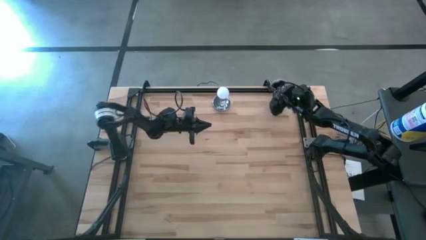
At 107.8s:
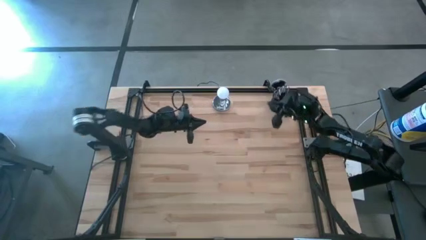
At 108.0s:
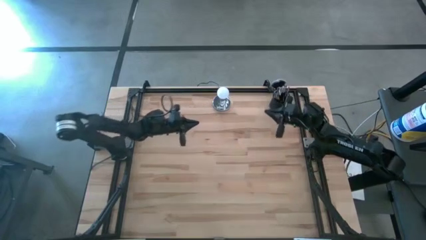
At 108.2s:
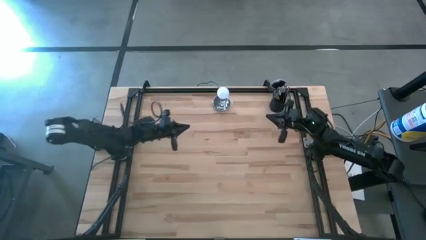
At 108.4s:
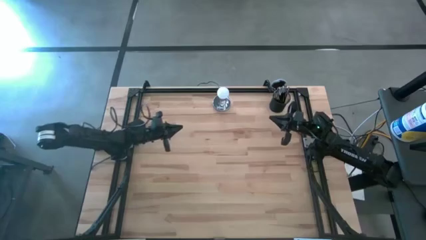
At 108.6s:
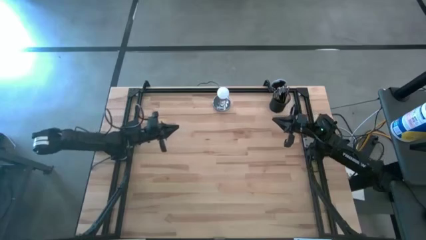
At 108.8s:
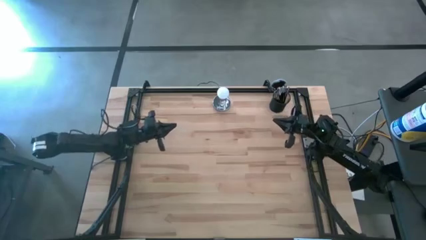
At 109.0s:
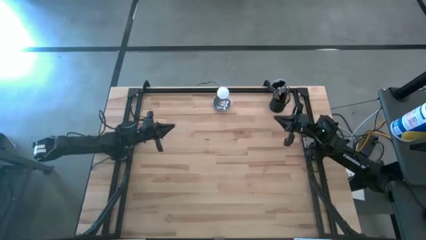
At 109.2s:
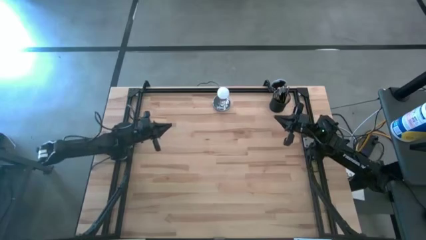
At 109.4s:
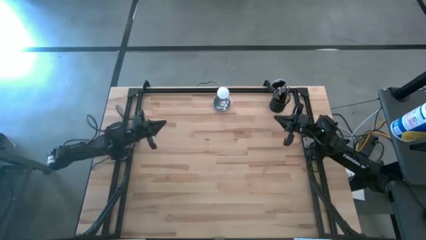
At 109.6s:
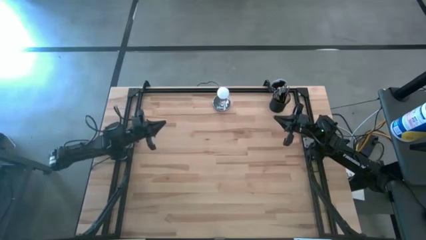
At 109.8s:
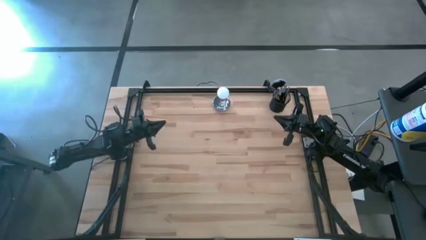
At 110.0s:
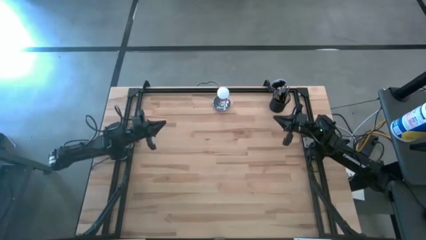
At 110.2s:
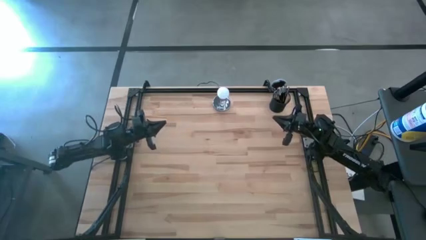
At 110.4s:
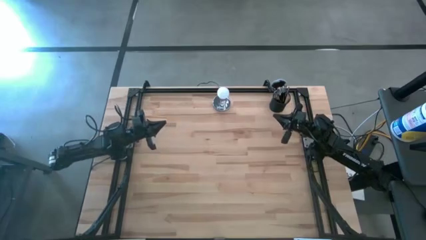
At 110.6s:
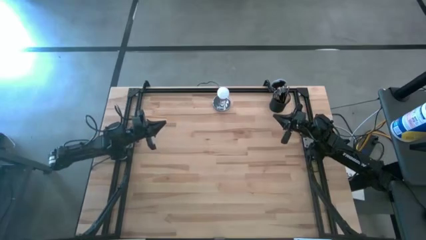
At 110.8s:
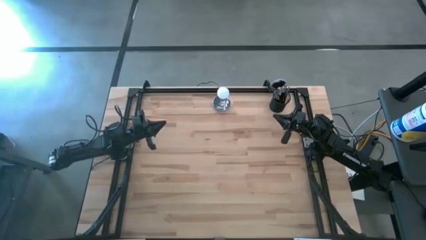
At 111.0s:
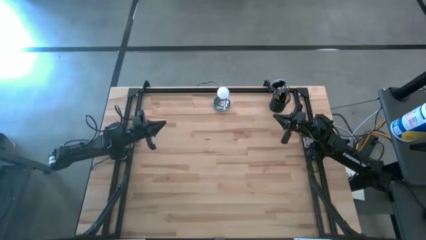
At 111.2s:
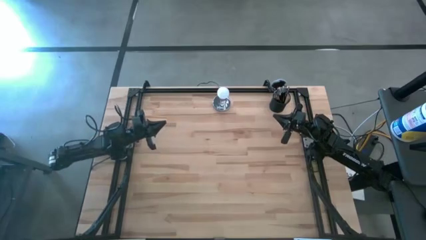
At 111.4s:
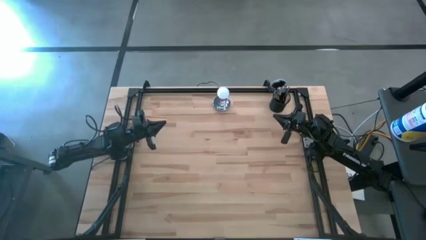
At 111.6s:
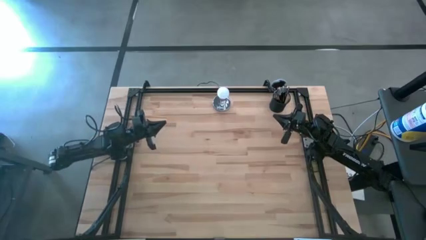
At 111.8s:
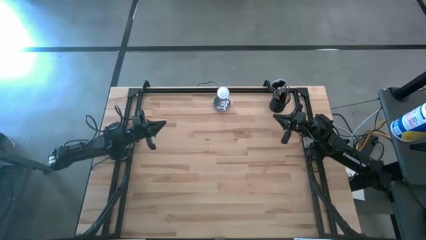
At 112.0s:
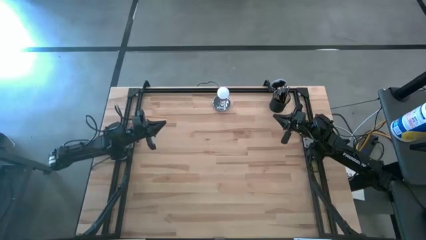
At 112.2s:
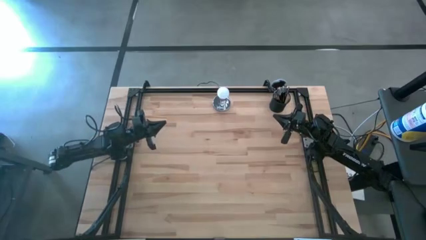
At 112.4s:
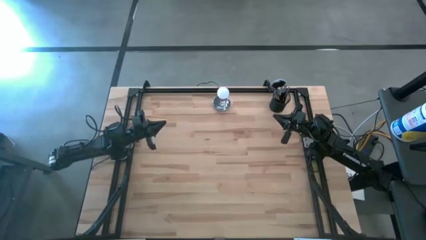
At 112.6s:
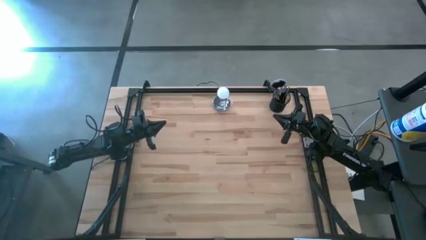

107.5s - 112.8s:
Task: Put items in baskets/containers
Return to Home Position

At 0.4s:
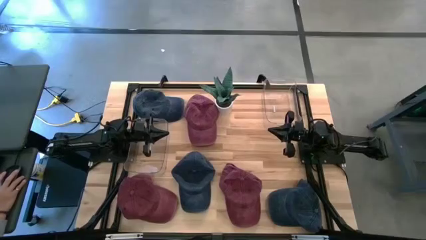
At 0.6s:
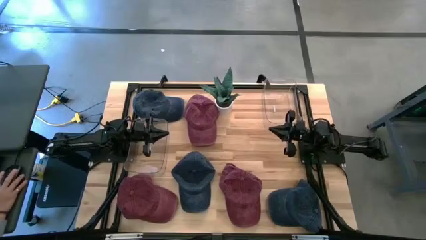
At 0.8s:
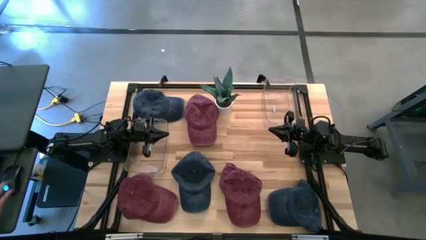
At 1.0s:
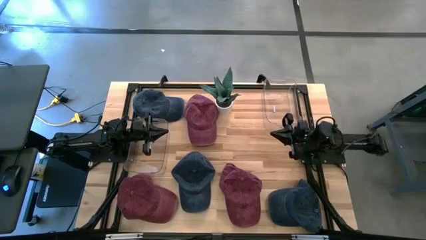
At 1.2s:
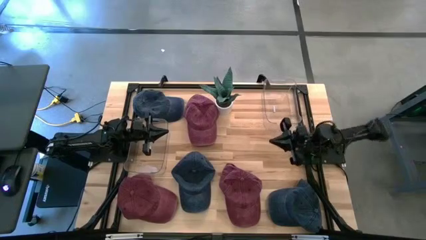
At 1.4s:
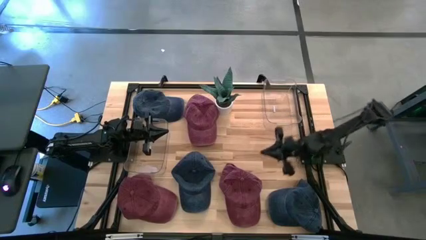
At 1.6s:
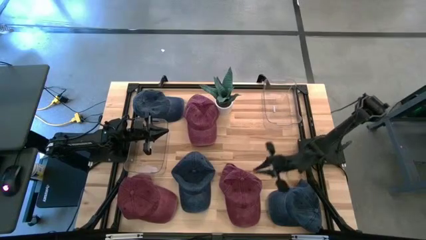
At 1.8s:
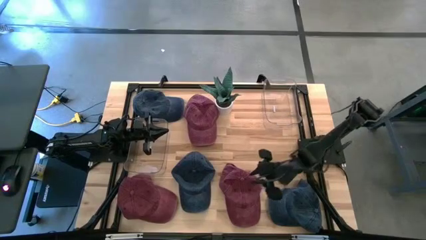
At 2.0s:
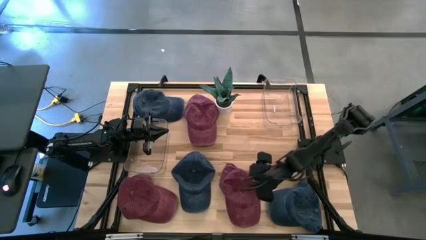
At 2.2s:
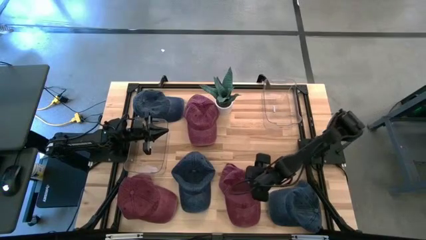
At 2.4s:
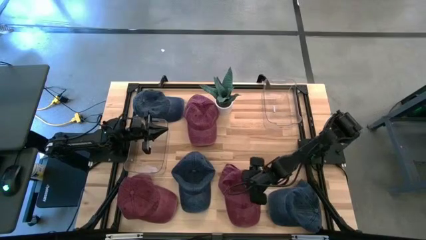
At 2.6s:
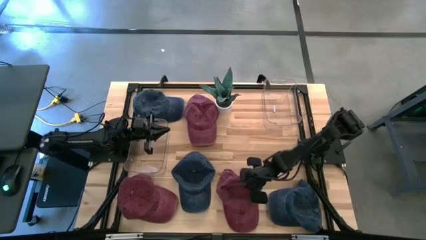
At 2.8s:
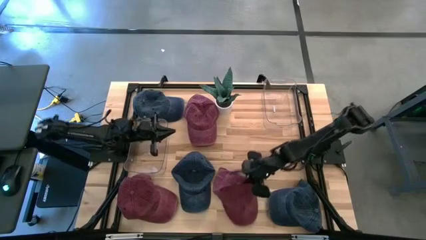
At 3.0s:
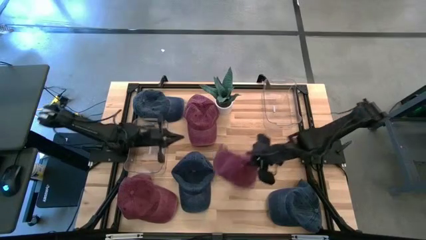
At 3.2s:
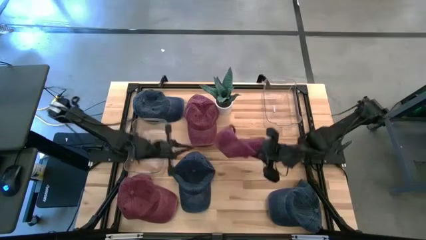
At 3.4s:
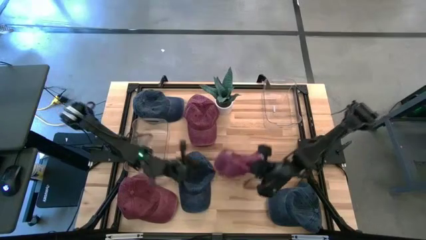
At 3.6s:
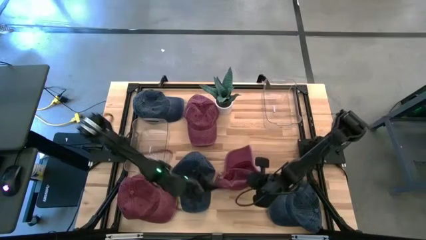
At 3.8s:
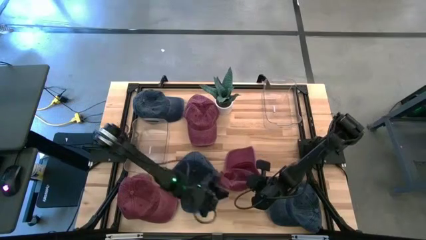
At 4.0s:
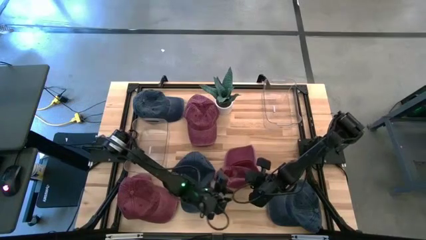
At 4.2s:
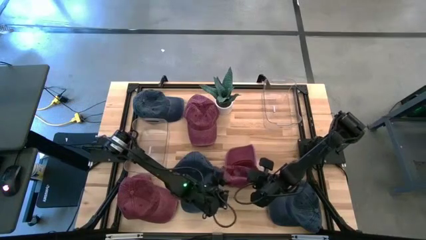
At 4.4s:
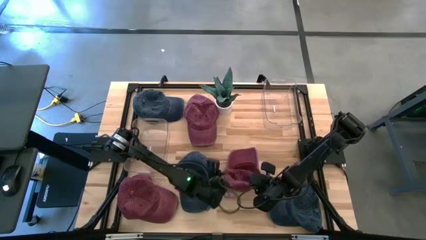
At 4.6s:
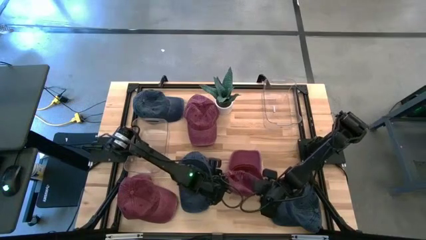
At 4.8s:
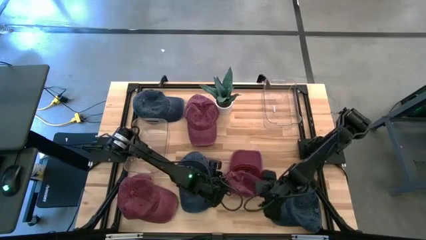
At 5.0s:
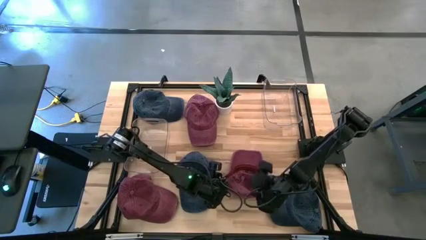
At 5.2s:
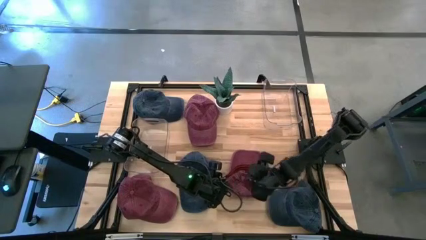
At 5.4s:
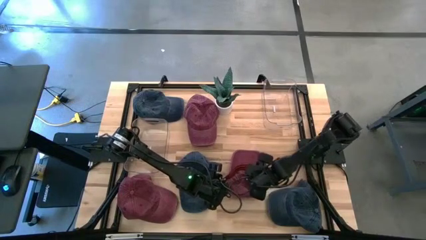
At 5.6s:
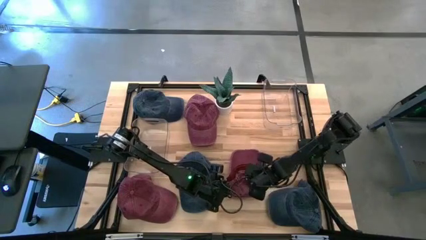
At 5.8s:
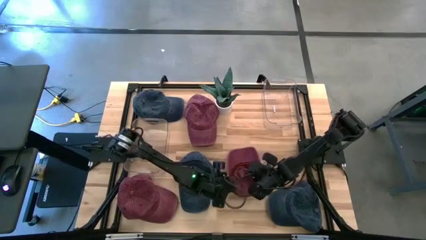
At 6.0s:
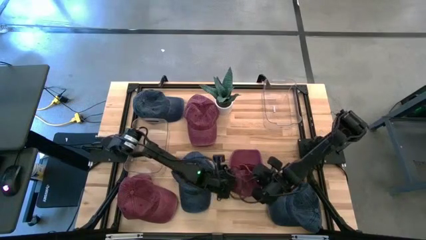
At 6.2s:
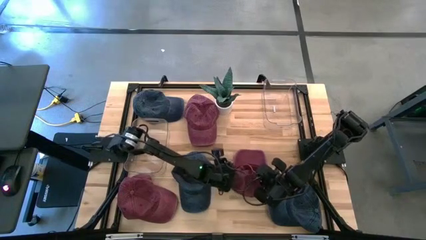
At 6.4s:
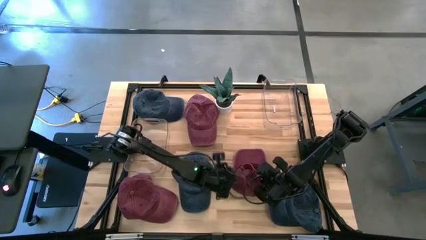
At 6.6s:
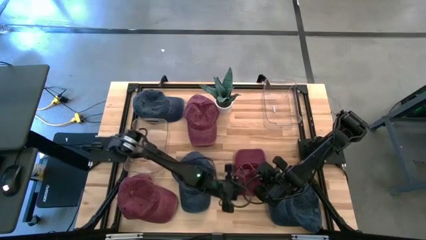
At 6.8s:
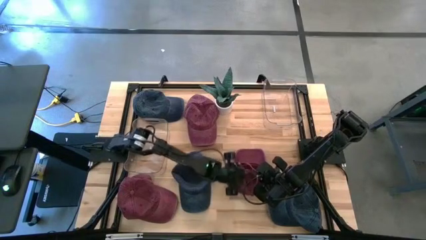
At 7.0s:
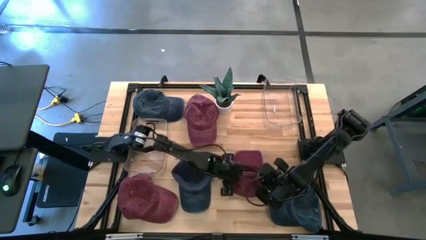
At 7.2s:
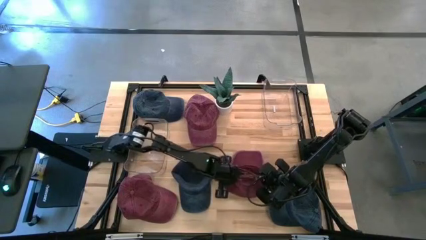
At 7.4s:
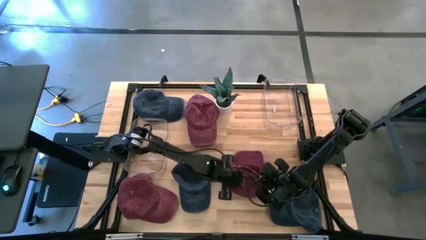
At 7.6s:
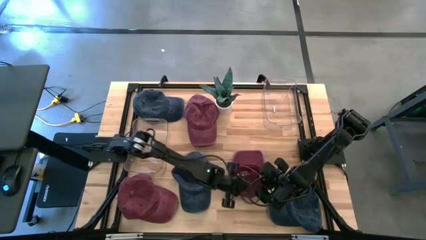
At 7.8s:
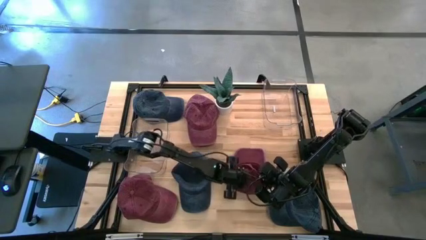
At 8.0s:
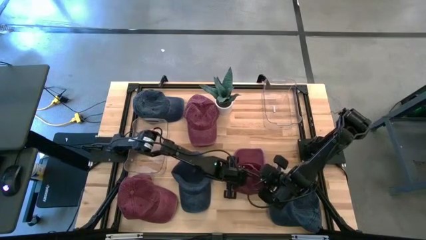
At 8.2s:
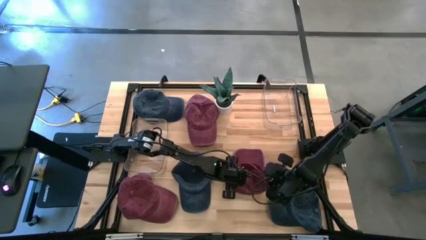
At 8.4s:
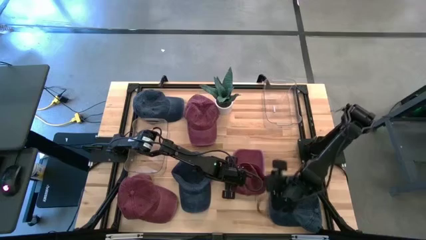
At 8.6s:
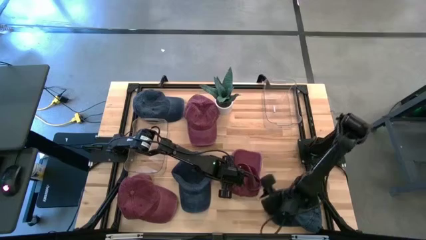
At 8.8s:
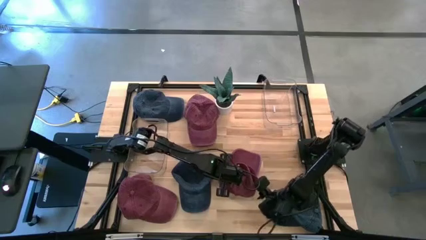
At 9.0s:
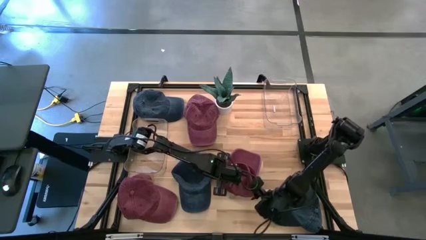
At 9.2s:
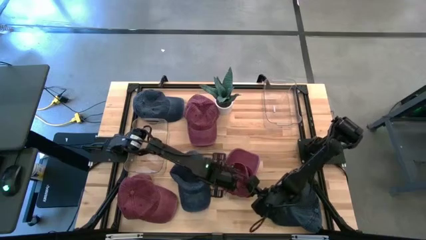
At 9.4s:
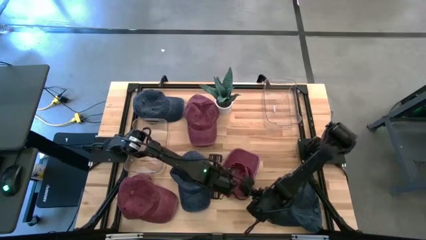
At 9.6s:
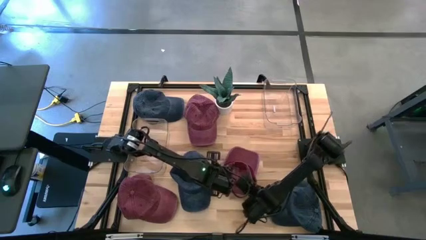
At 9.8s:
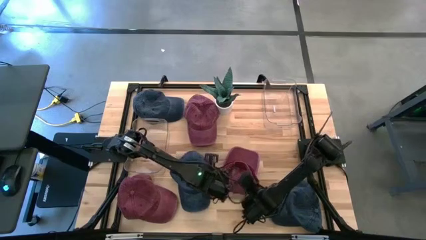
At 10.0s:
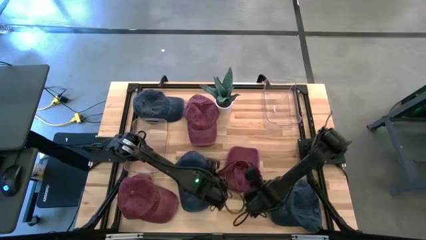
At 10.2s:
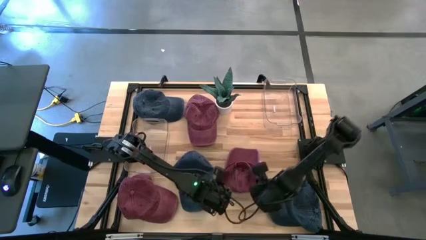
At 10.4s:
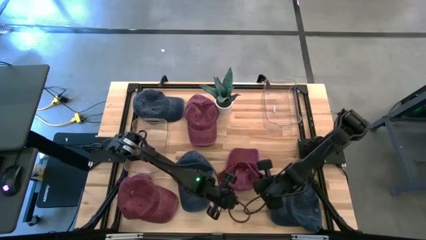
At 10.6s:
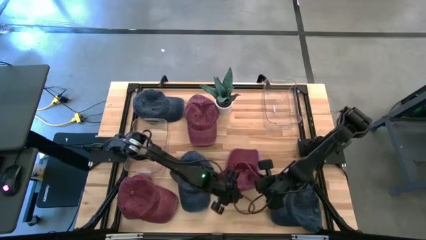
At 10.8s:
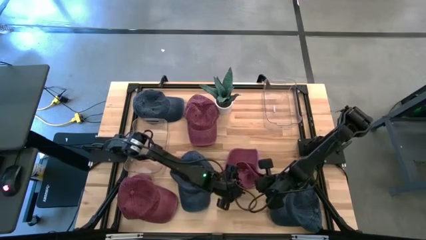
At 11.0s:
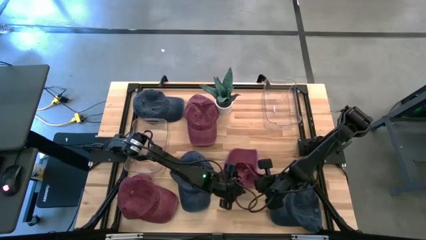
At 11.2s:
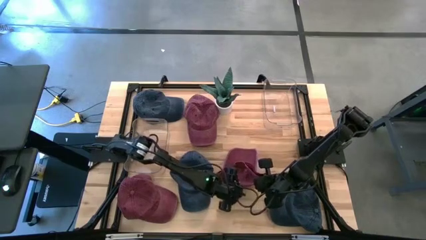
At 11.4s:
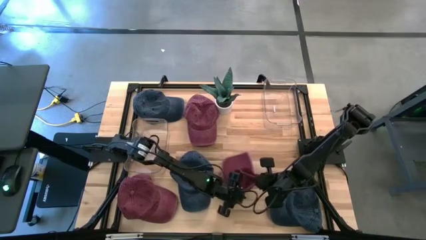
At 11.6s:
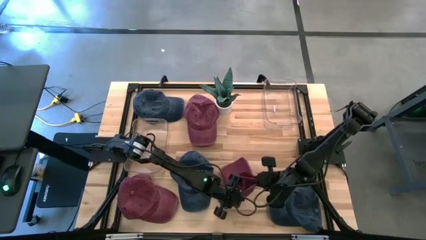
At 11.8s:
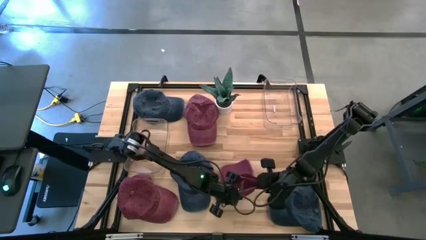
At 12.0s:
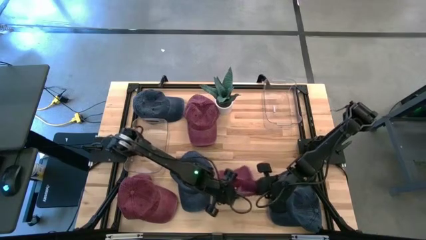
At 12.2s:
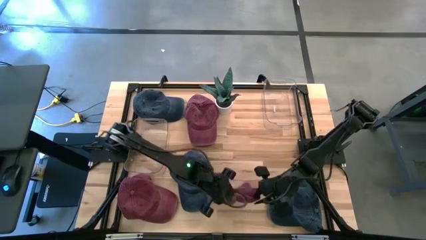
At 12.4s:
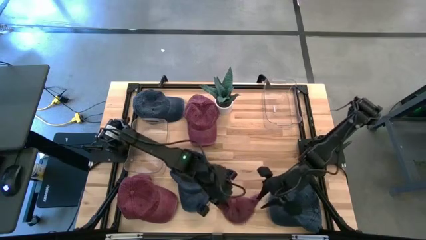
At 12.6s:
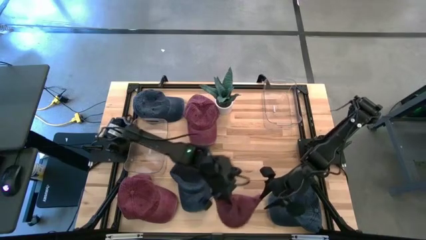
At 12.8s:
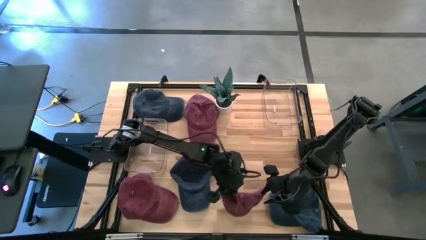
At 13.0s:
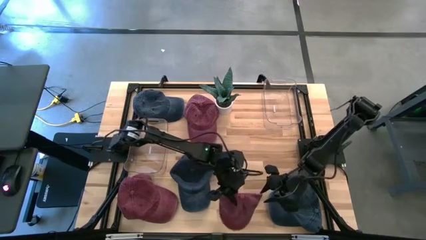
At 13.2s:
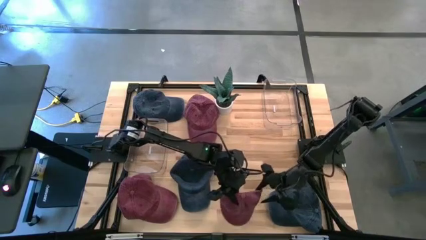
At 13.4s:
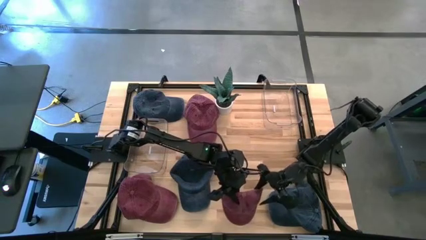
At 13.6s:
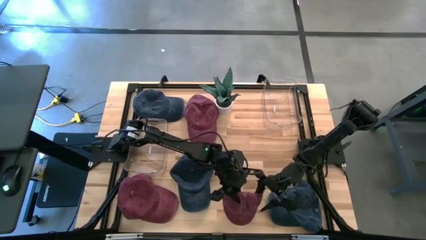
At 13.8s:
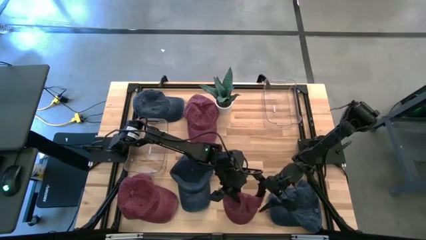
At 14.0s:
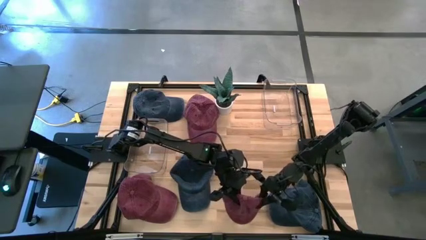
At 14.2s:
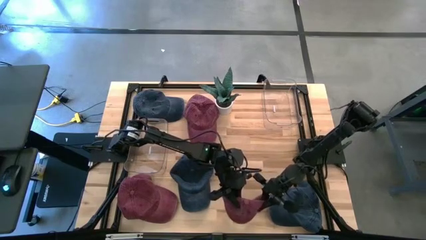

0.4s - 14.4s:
Task: Pick & Place hat
Put the right red cap into the left transparent bin
